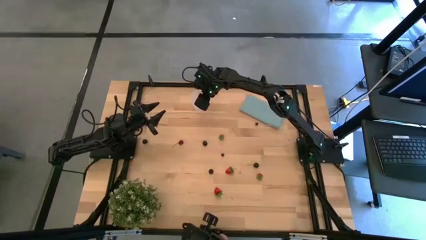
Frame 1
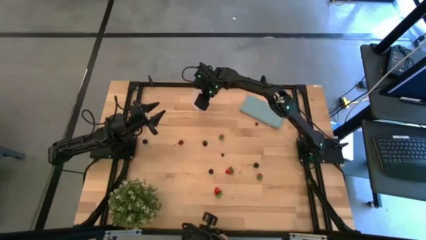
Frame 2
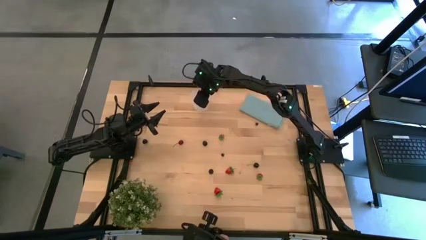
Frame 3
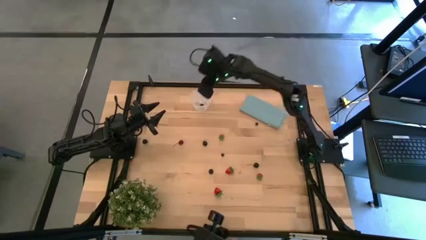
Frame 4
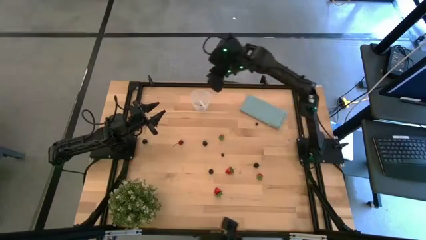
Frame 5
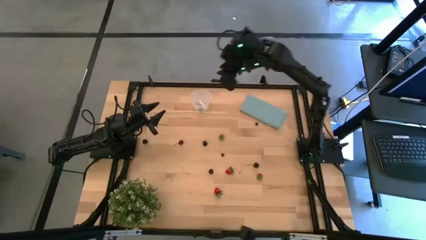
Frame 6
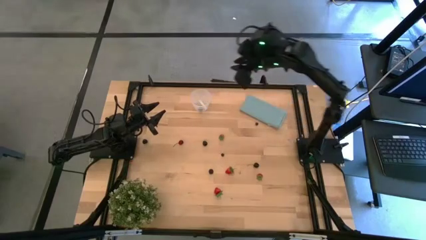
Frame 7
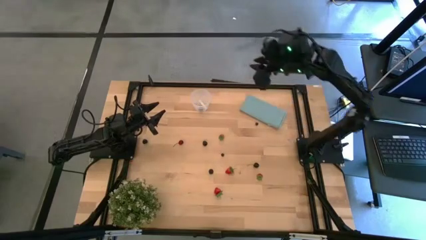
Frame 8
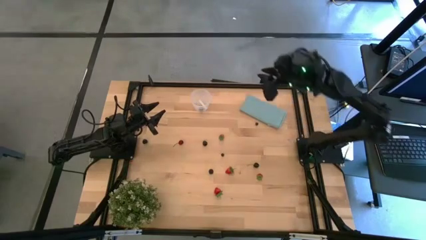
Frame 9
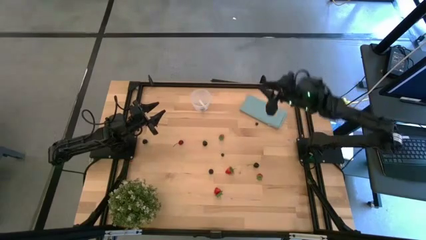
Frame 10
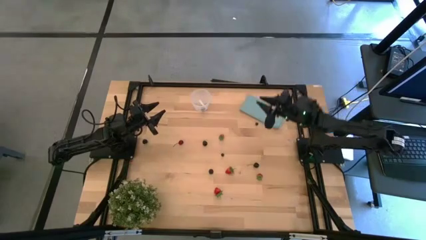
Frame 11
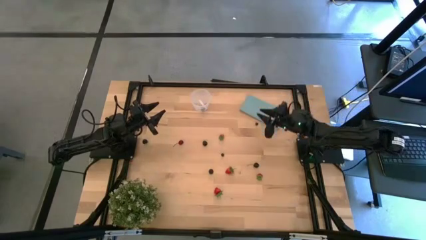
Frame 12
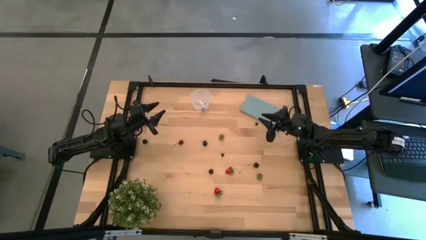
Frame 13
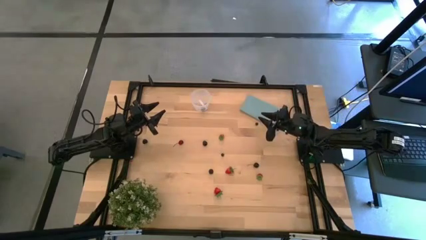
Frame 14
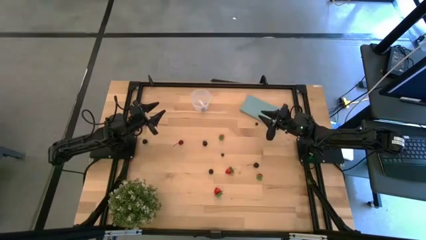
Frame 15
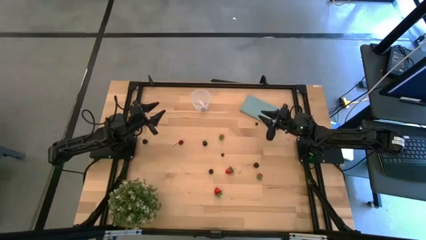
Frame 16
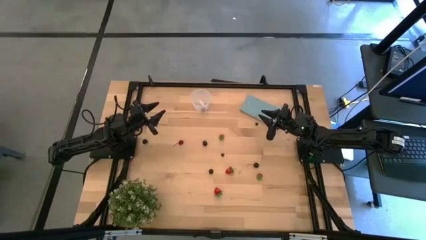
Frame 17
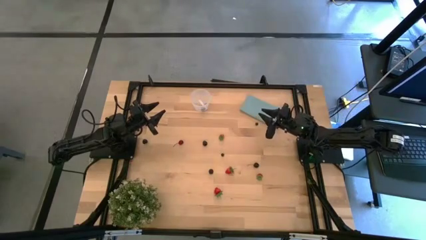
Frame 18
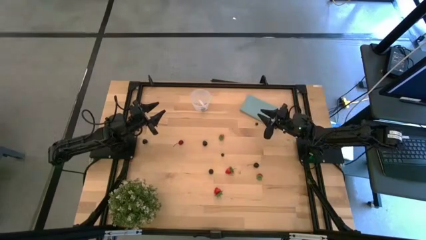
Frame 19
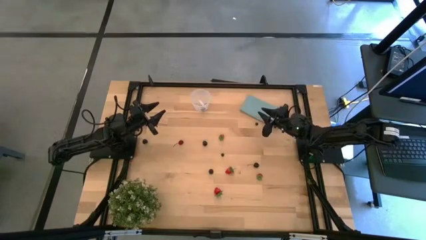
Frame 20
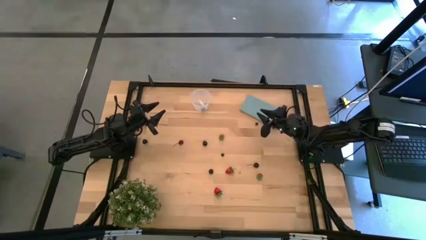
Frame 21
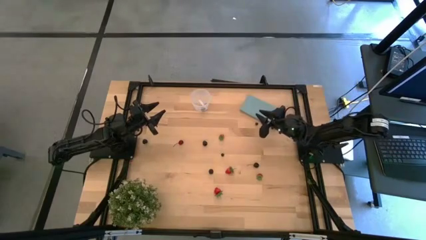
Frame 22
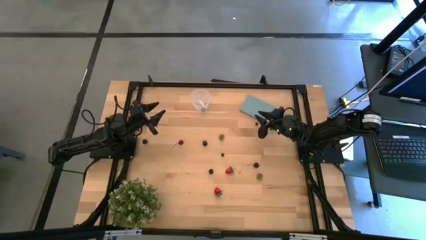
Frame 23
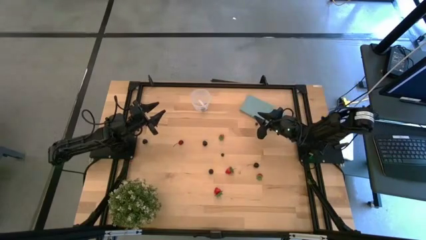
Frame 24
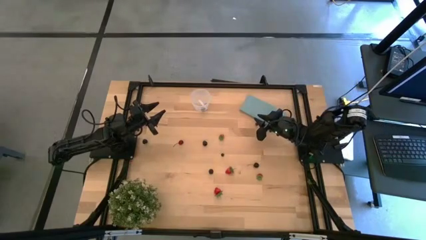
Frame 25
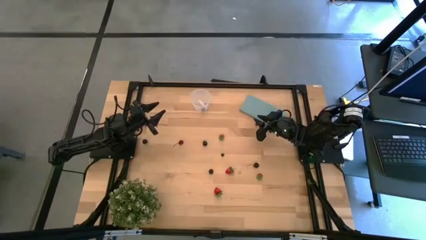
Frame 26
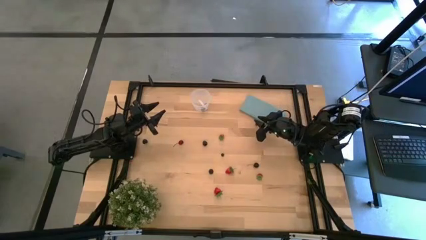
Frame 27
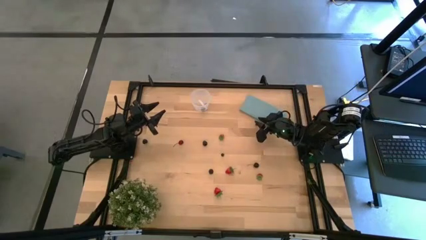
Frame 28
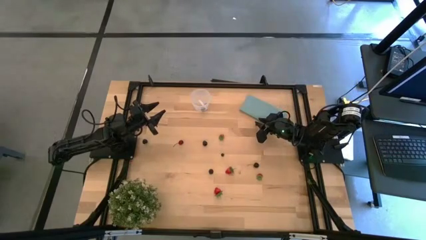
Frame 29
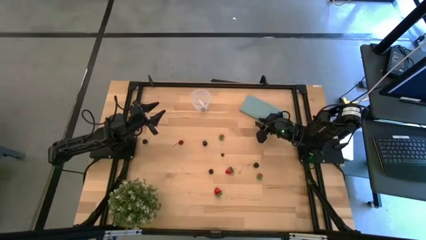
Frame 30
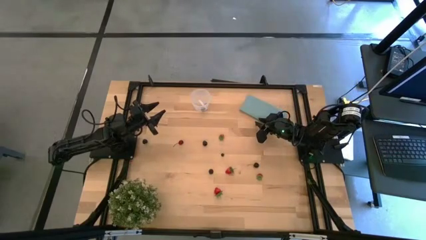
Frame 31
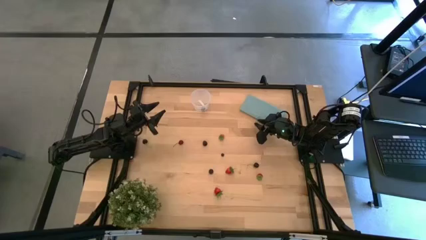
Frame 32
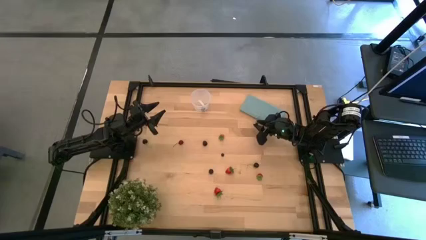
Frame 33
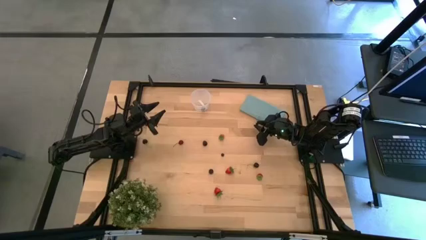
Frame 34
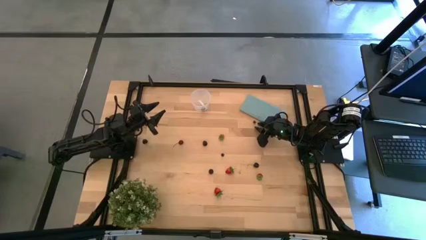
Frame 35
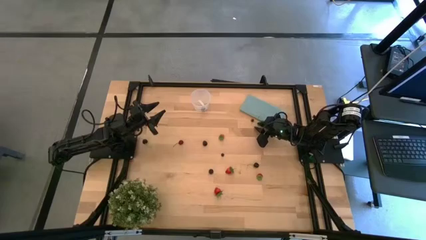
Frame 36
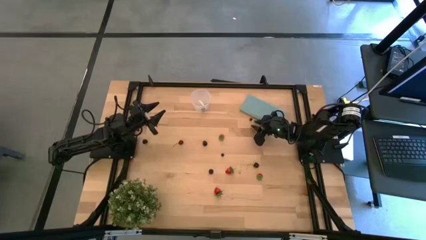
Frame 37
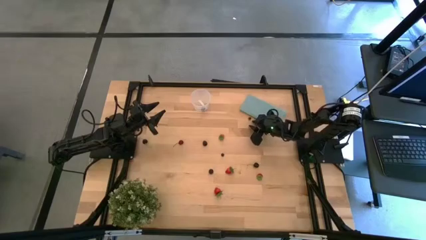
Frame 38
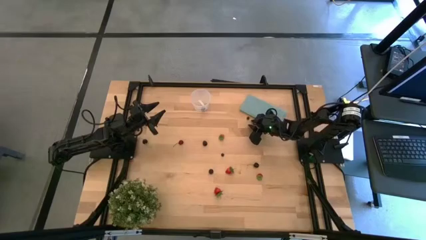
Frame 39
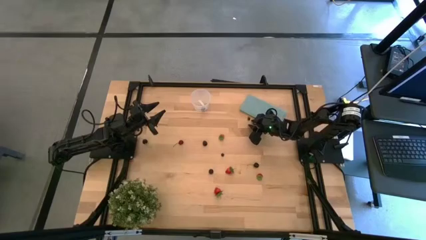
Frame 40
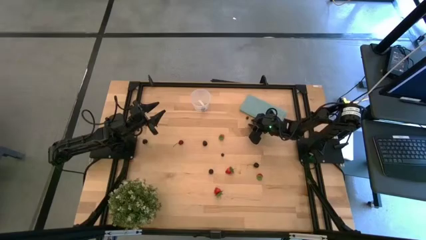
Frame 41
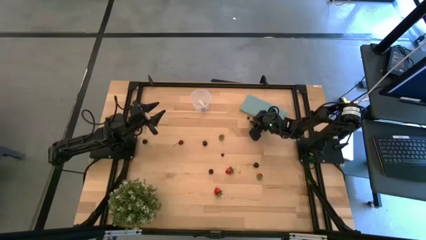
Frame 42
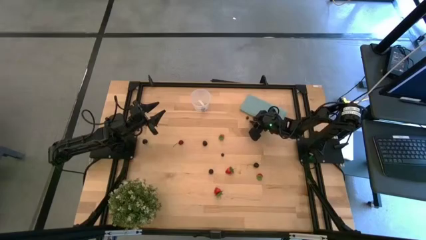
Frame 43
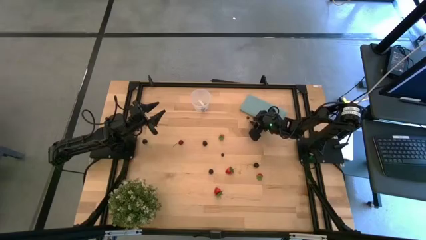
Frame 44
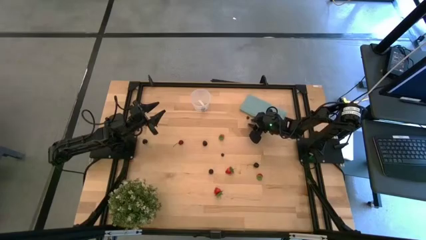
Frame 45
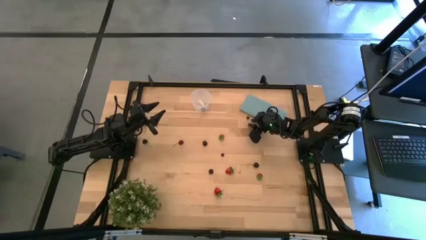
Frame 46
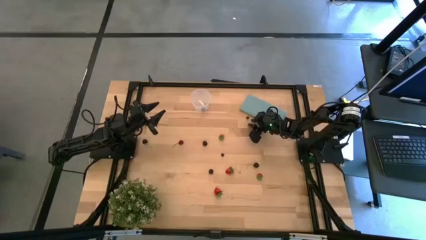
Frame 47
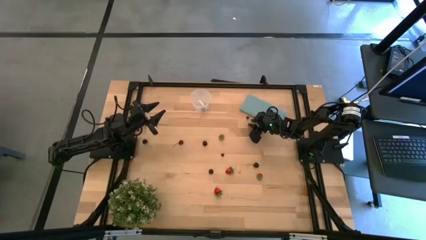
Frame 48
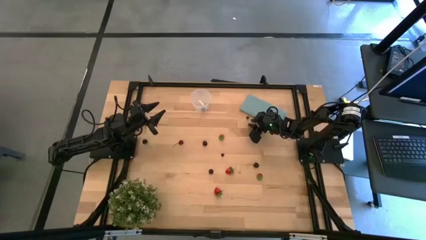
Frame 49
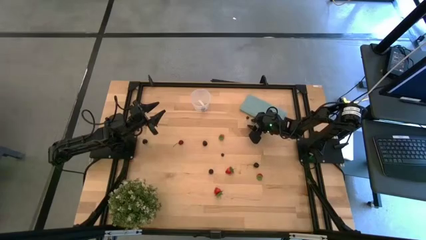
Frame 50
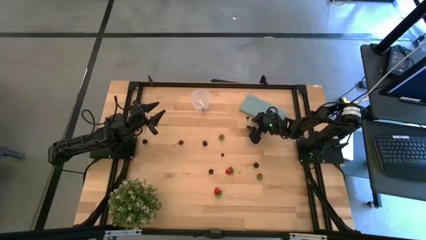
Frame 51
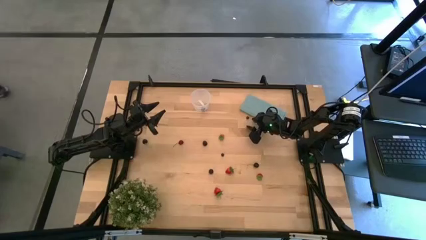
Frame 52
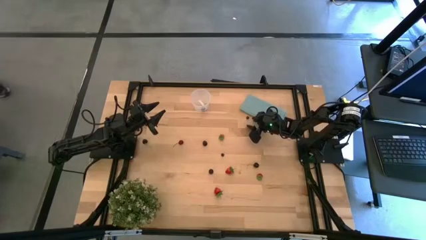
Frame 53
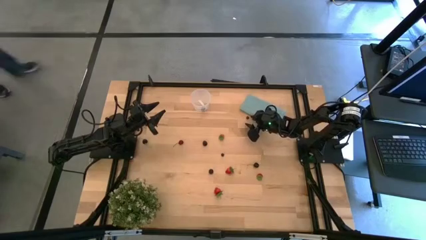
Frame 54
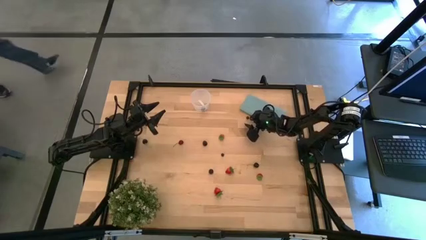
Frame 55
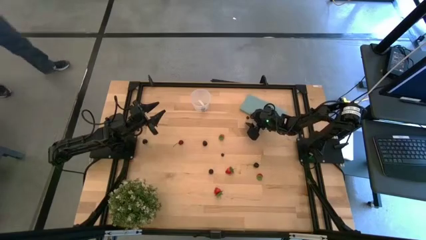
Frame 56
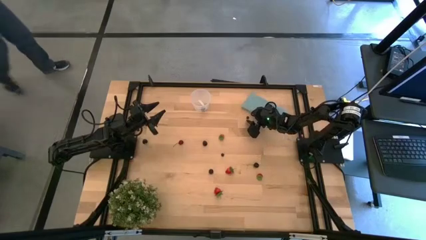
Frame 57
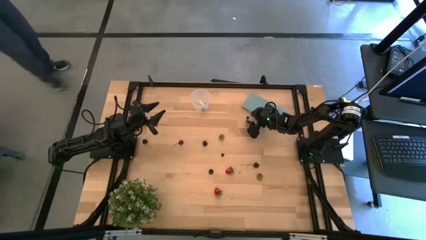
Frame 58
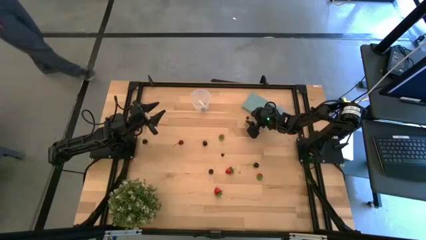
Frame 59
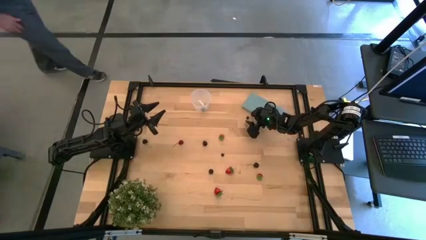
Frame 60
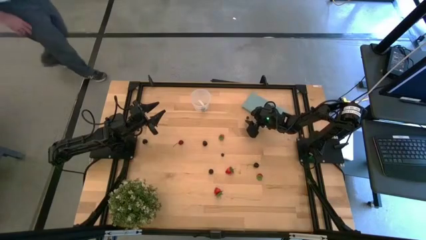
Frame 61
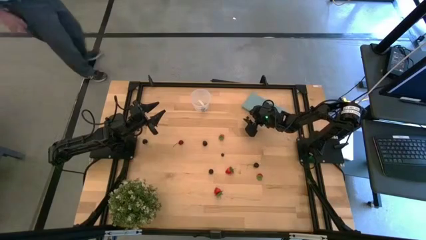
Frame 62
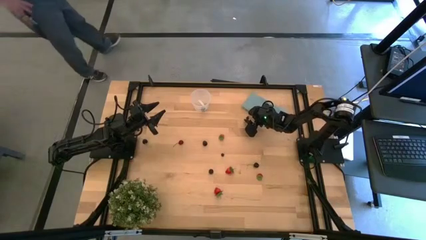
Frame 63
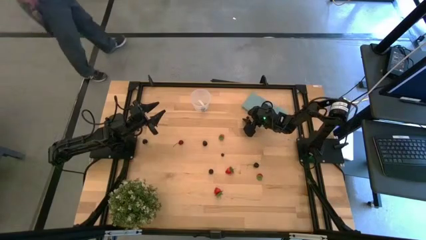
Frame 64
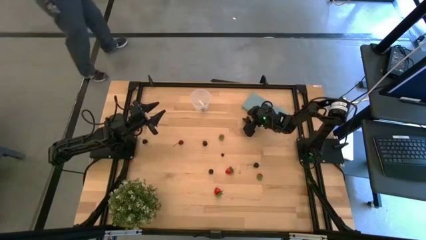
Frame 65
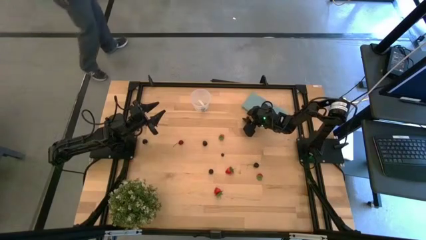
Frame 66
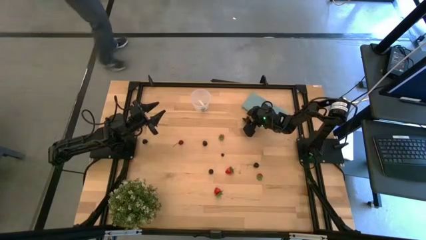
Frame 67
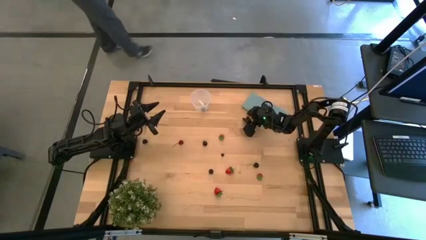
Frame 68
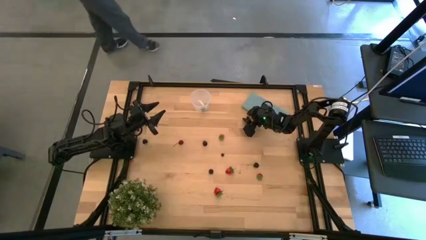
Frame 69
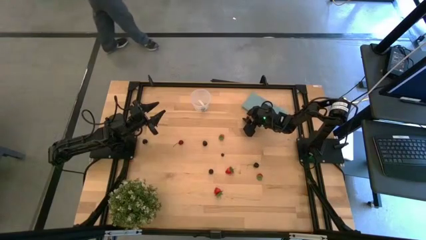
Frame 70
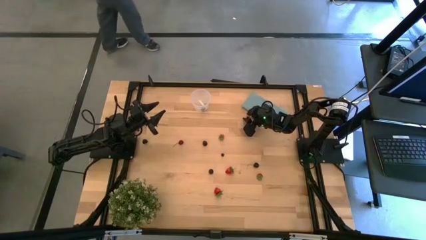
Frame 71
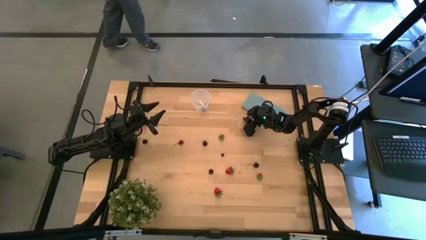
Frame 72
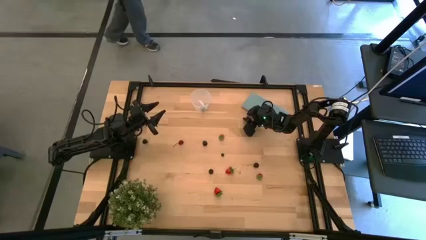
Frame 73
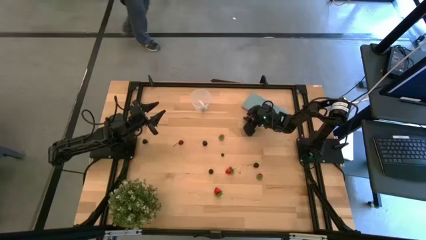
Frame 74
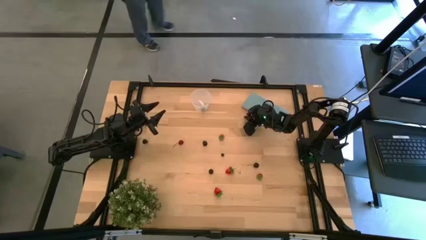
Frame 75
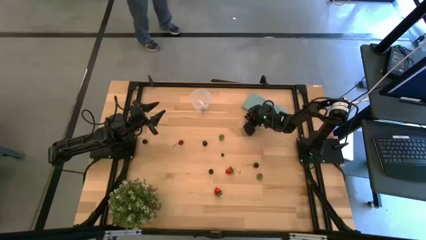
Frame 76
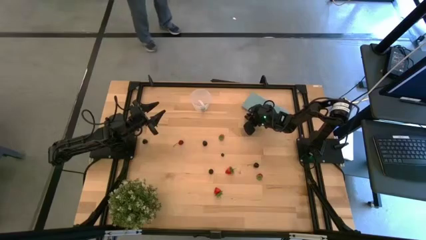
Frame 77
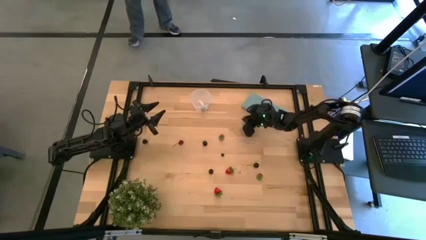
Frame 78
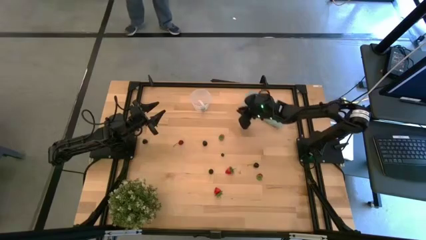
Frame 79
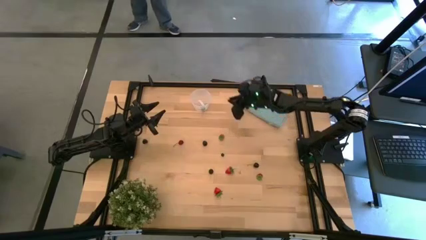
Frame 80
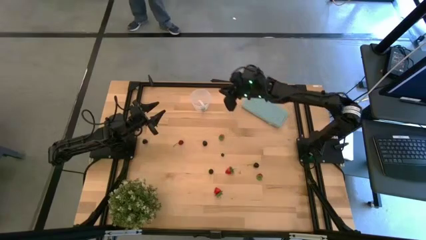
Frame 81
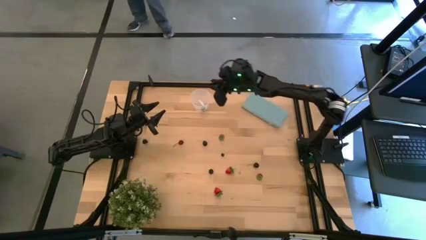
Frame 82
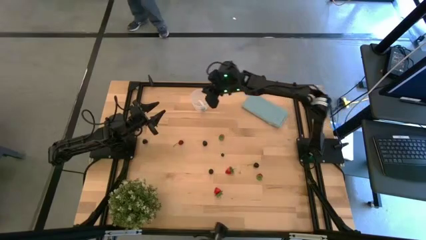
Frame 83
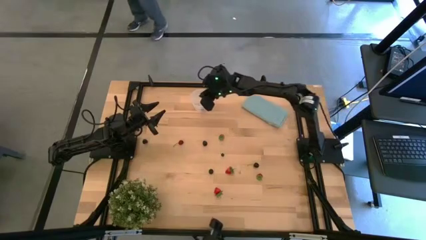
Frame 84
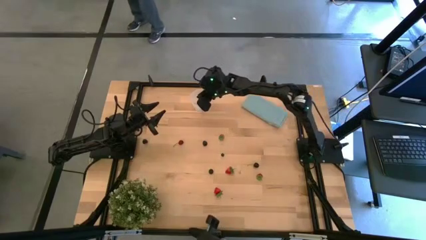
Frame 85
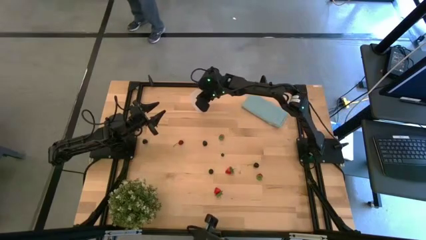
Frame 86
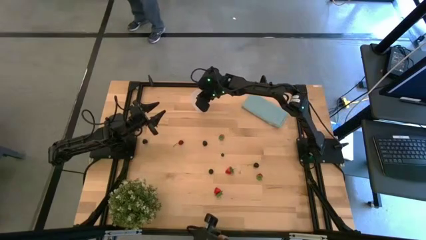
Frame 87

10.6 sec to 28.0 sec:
Task: Pick and placing Produce into tupperware
Put the top blueberry into the transparent container
